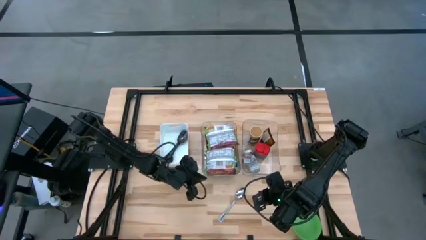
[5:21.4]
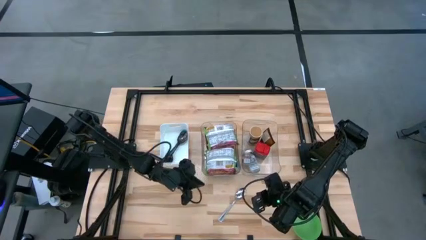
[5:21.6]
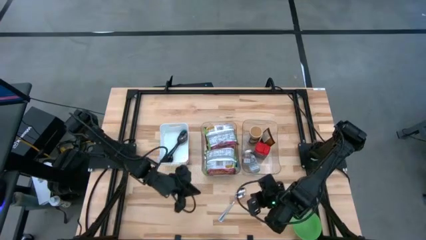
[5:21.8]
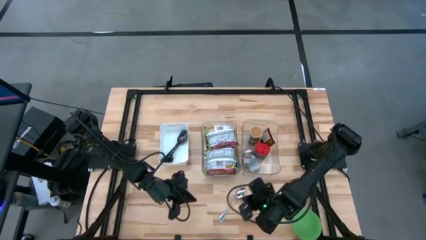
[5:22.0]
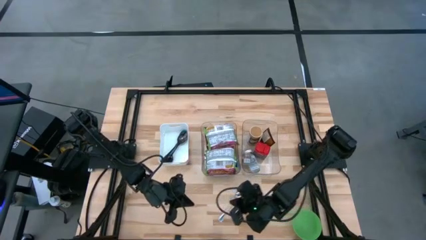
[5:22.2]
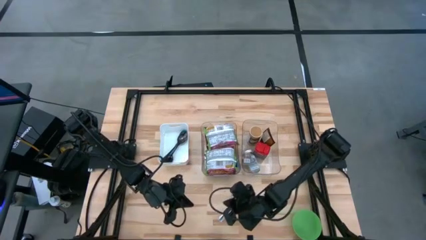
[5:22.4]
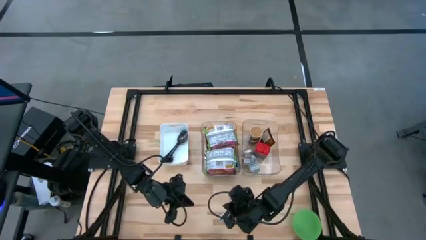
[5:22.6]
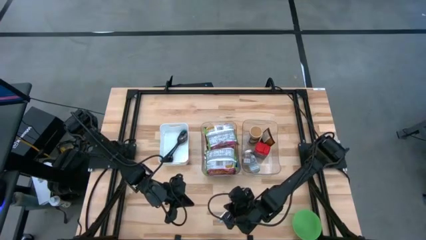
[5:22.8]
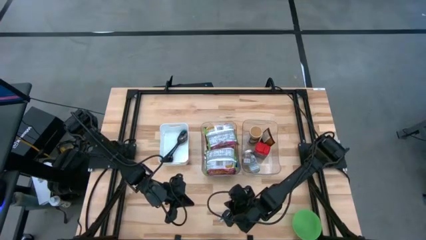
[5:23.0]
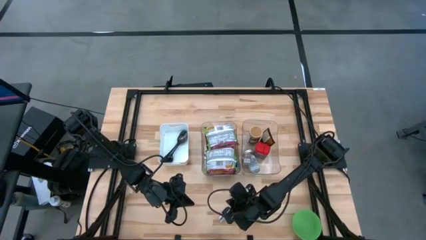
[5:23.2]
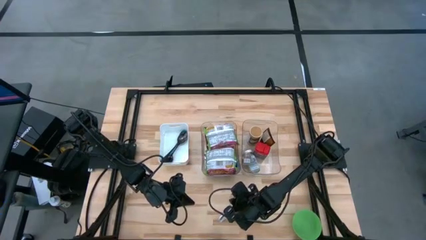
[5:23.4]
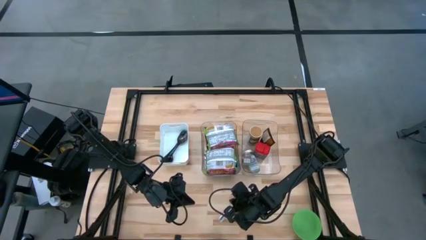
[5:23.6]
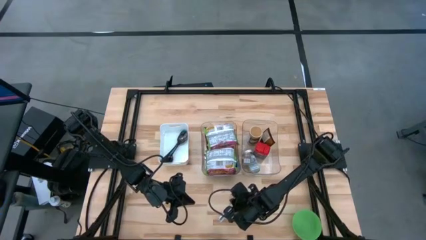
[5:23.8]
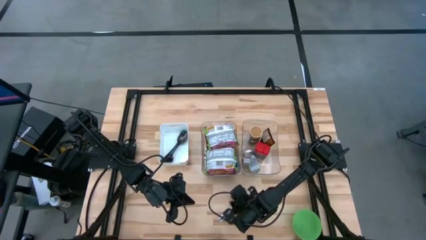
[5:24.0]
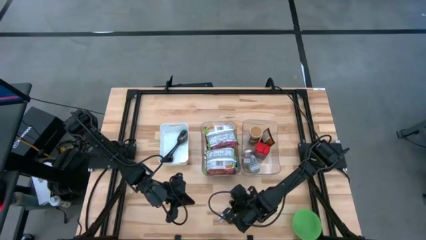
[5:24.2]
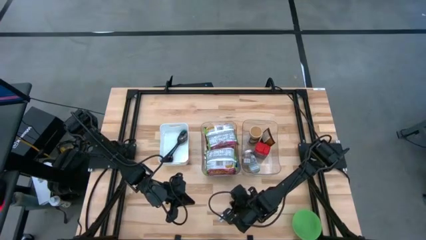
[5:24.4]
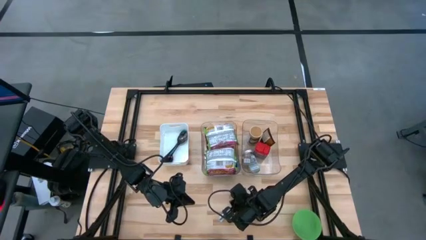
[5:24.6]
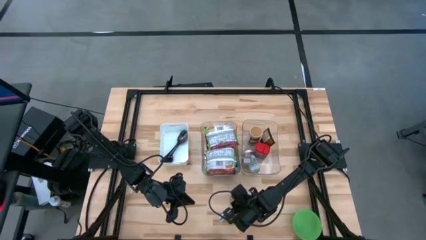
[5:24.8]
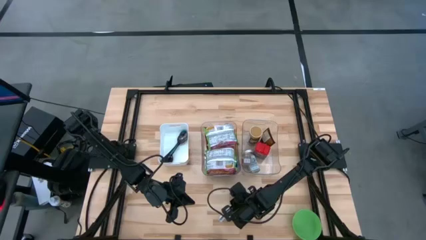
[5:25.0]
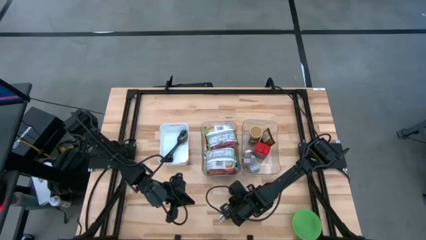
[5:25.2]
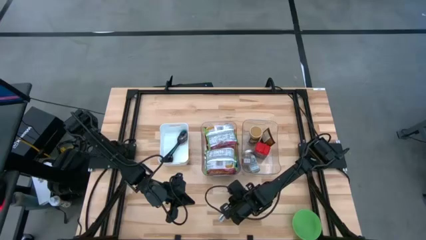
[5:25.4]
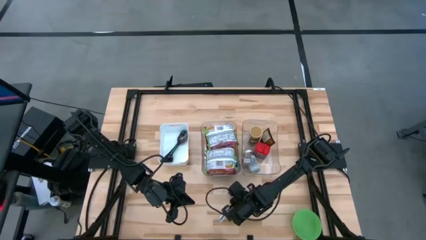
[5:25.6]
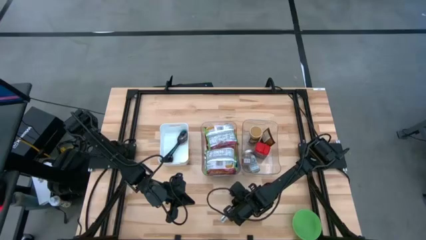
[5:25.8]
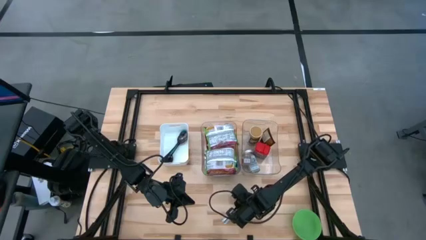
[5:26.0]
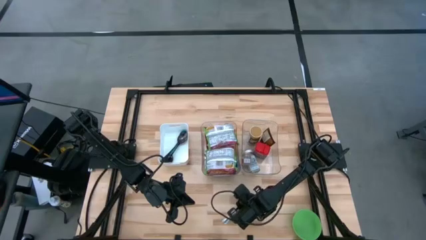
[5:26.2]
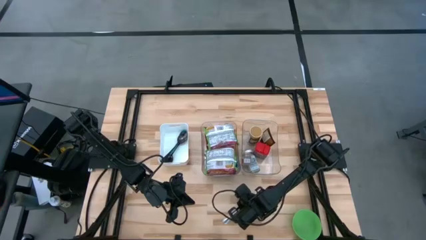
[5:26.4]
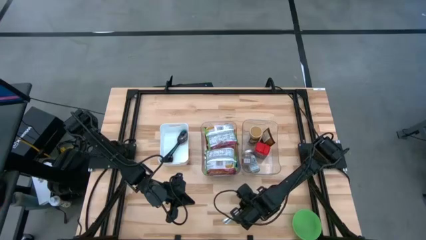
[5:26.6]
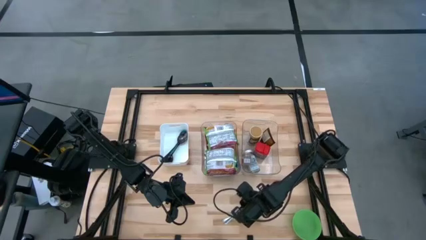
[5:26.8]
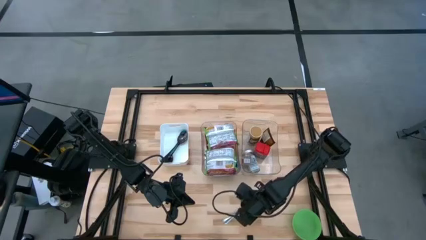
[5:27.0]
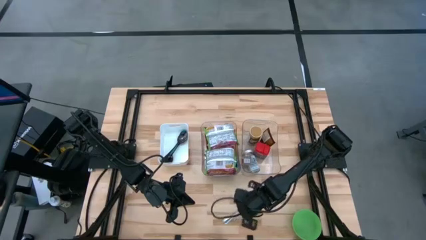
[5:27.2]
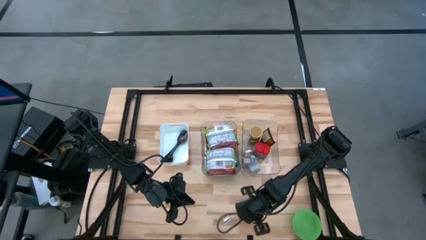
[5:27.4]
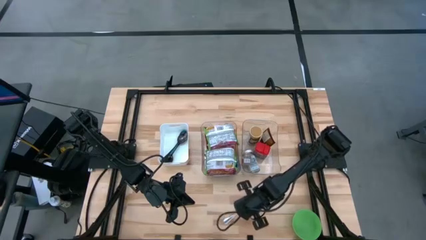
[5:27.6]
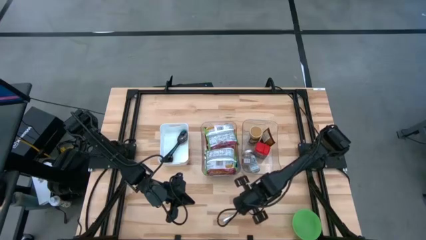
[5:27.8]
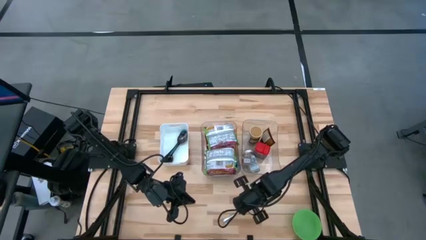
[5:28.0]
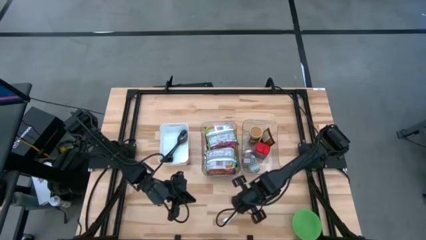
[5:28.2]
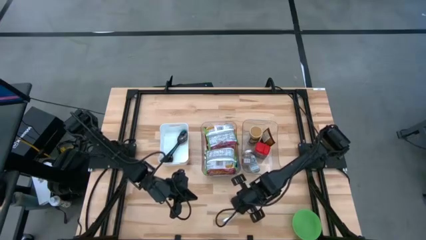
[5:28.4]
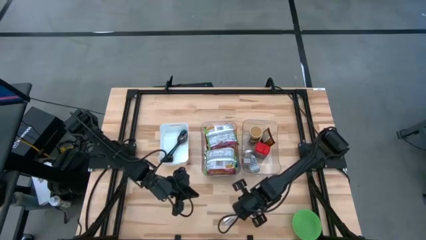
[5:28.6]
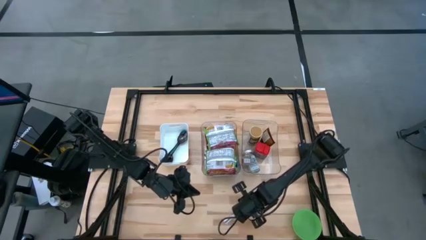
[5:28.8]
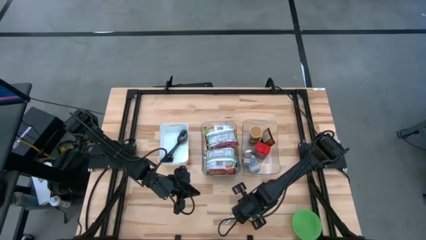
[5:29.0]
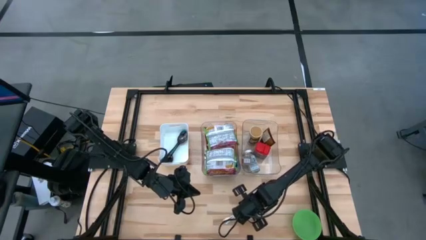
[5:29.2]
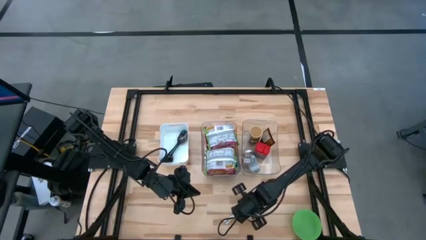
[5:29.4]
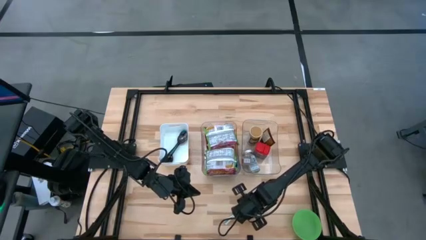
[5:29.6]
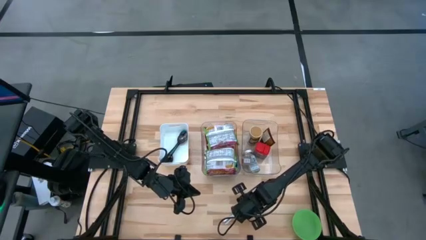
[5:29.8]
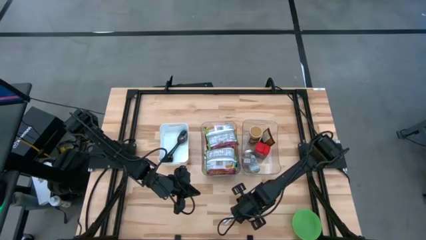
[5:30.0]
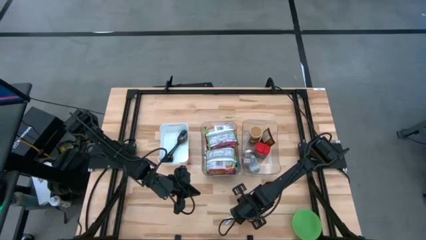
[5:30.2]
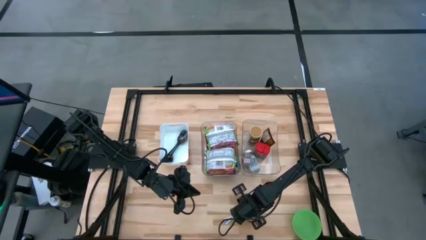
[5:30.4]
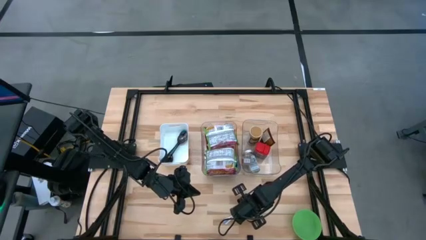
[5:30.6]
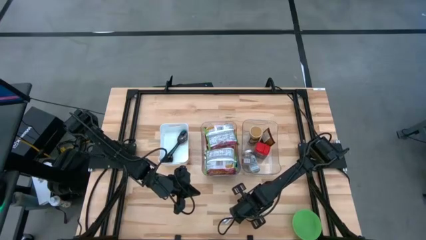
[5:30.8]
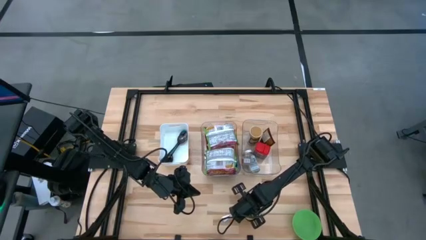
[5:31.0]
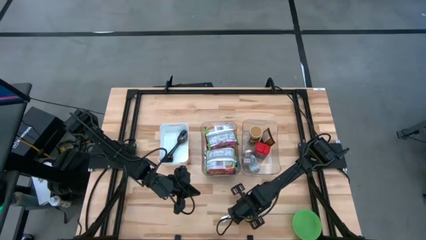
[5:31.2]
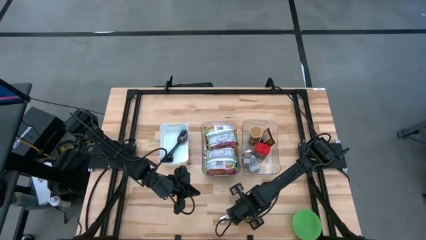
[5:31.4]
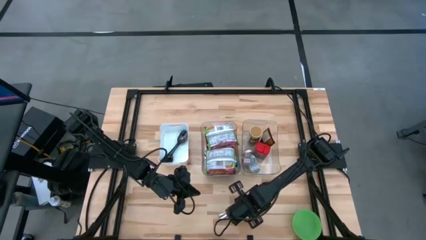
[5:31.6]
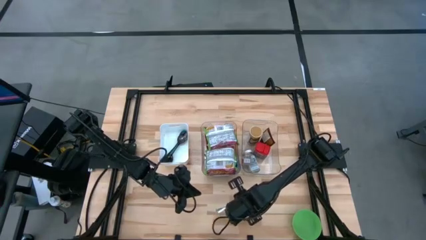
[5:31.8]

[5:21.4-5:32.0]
Task: Pick & Place Food Item
Put the silver spoon into the white bin
